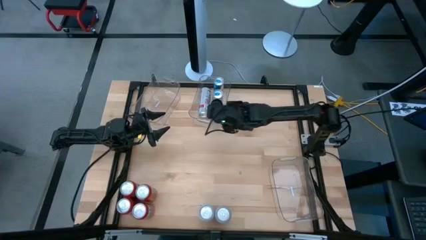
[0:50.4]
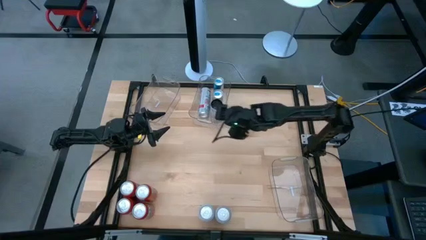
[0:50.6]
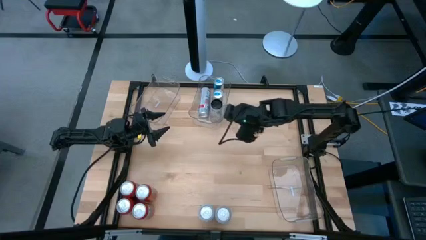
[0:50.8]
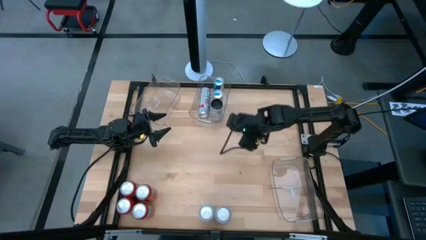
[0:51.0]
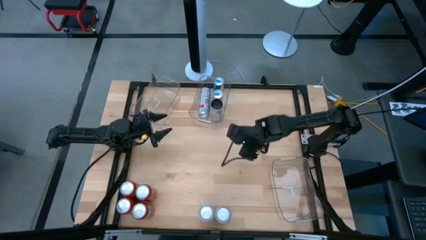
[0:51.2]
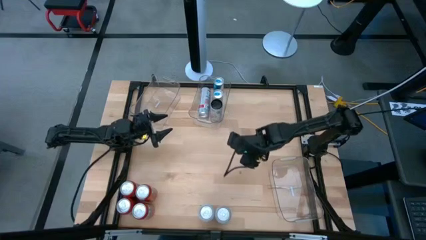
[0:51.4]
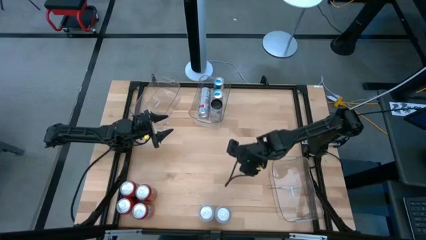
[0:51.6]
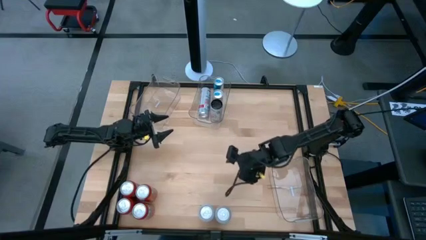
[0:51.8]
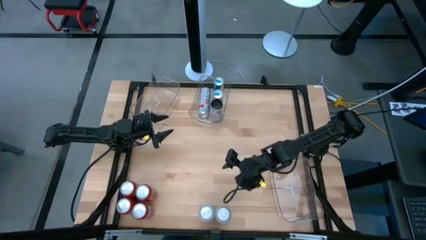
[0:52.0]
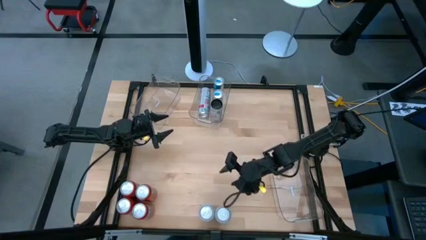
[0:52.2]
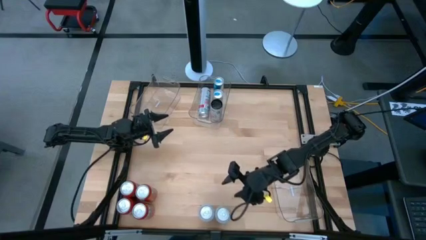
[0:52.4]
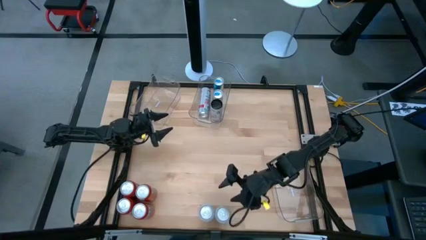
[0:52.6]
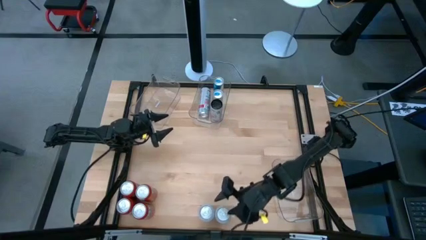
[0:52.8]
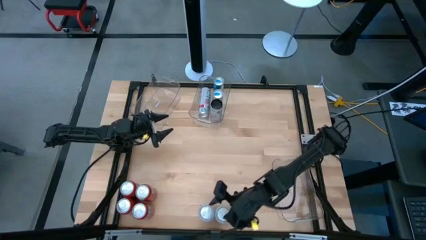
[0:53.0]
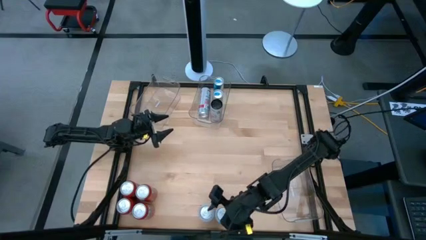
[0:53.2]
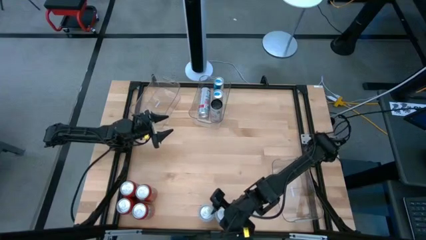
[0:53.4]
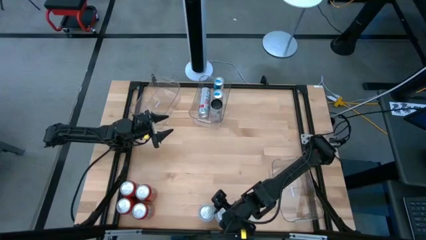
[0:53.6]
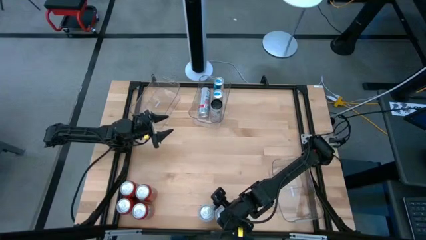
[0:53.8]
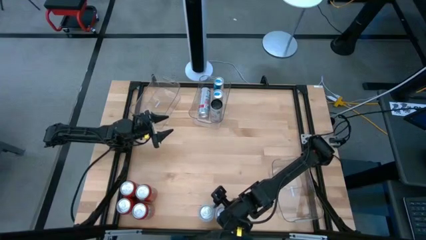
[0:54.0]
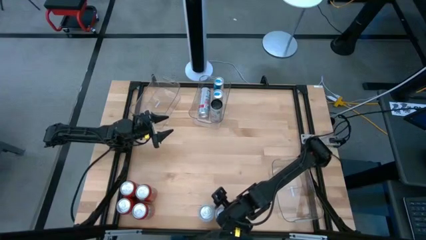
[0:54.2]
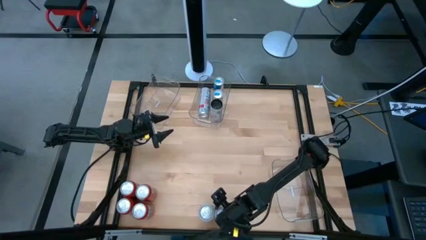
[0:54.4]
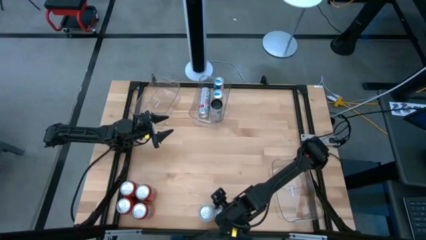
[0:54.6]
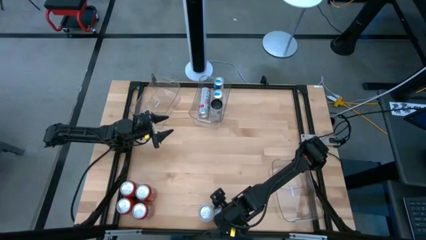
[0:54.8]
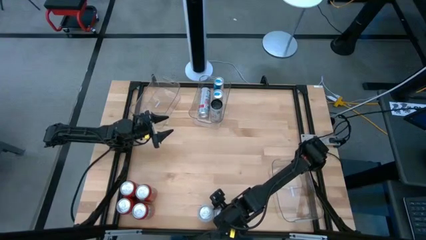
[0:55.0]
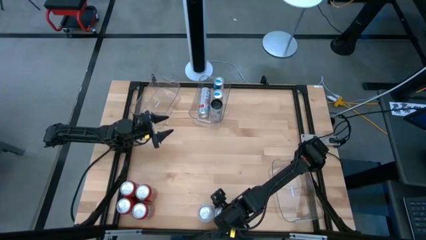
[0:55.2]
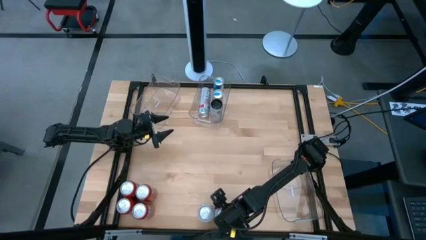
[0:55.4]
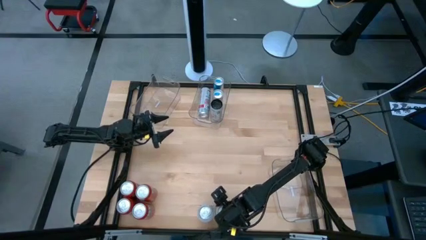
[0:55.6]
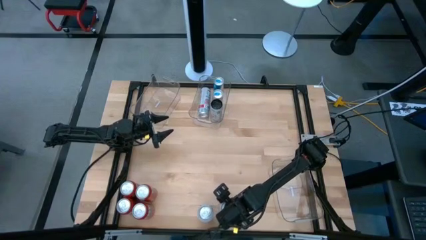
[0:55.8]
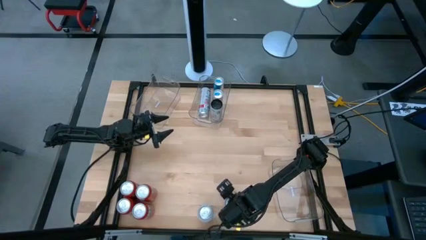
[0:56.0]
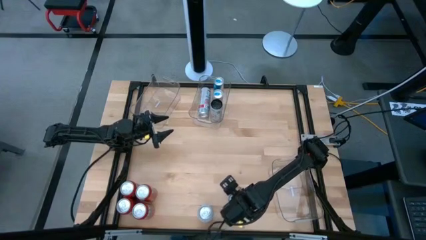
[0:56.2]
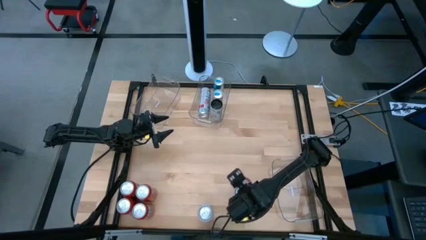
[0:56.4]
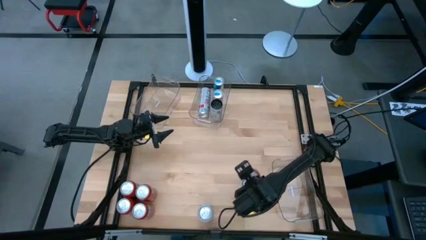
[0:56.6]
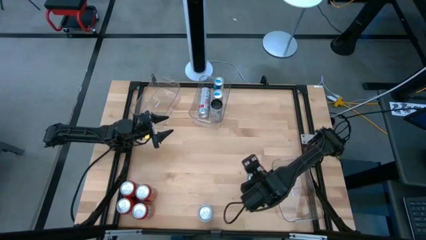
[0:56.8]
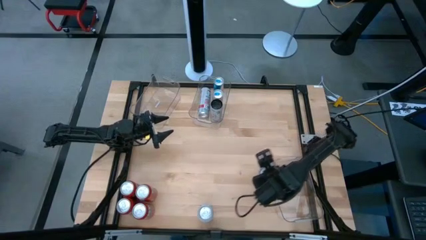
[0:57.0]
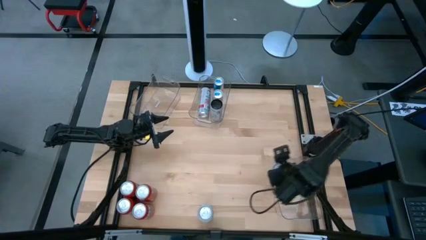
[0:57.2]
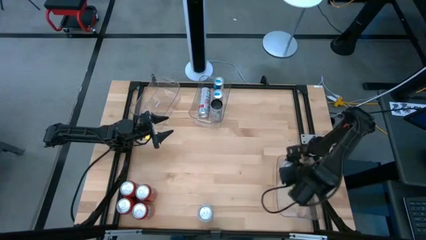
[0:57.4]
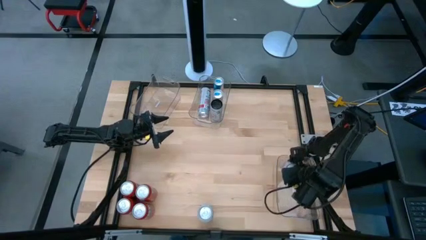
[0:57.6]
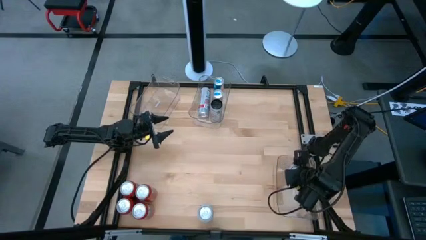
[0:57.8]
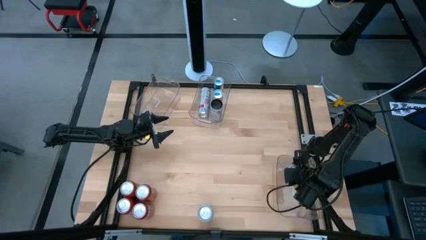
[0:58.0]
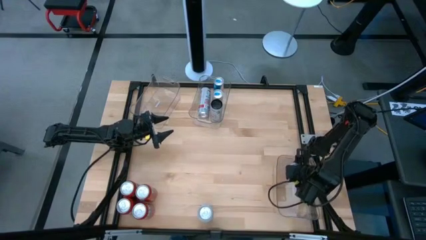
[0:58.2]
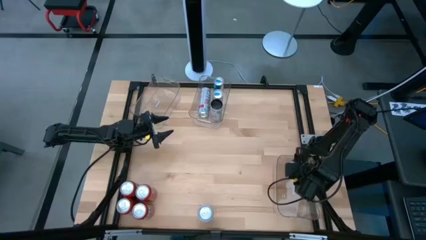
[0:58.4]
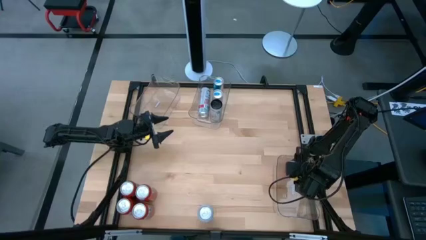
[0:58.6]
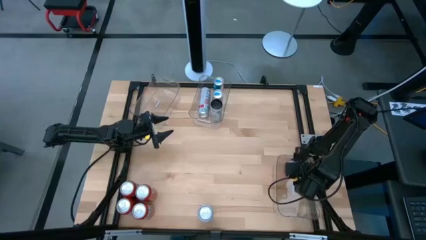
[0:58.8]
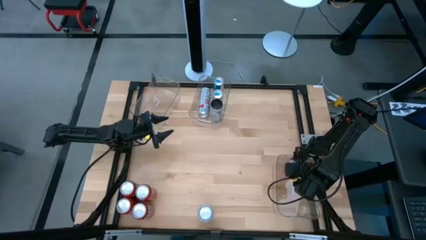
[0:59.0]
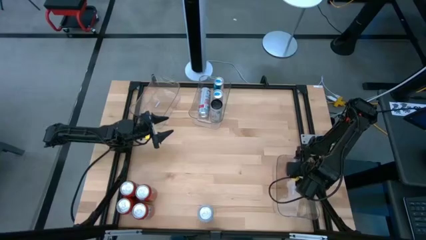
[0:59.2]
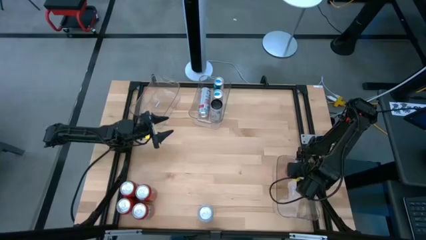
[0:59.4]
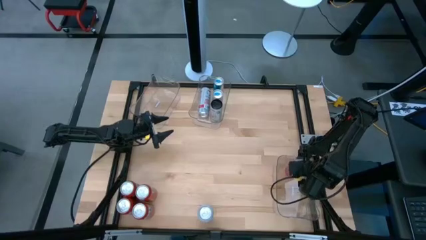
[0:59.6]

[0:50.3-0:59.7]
Task: Sort soda cans
Put the pink white soda can into the bottom right transparent bin

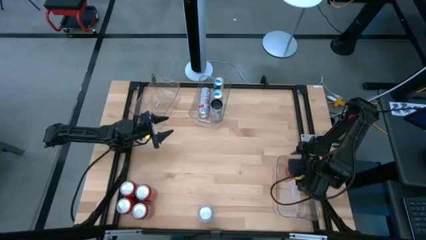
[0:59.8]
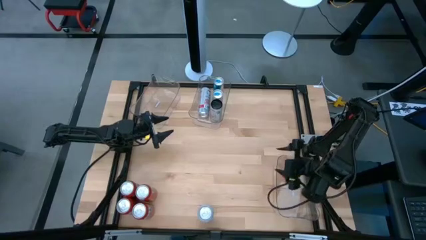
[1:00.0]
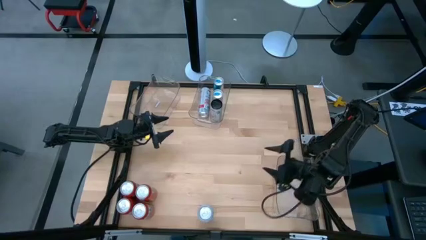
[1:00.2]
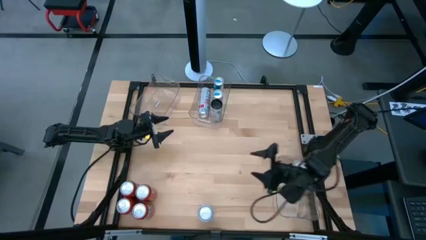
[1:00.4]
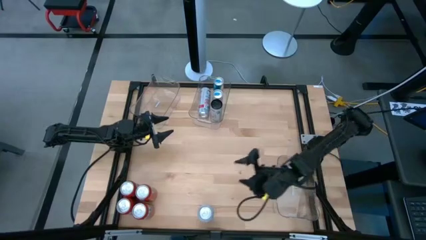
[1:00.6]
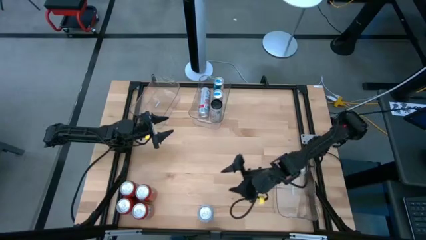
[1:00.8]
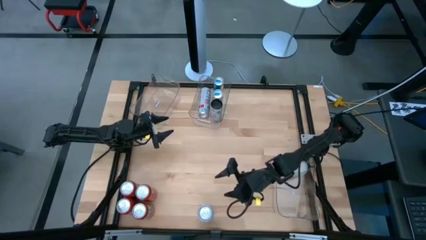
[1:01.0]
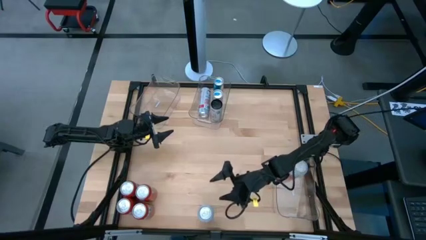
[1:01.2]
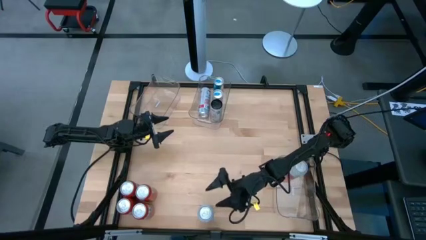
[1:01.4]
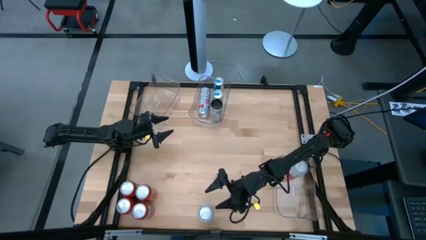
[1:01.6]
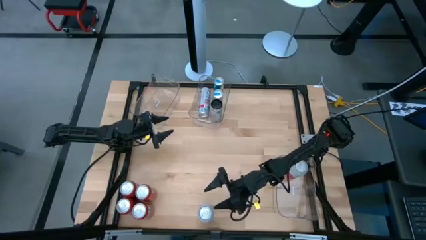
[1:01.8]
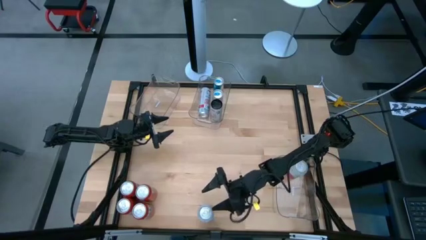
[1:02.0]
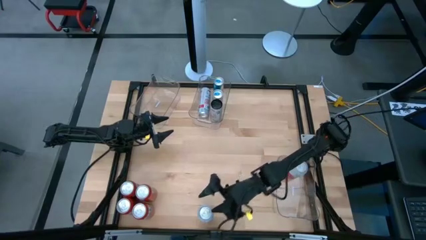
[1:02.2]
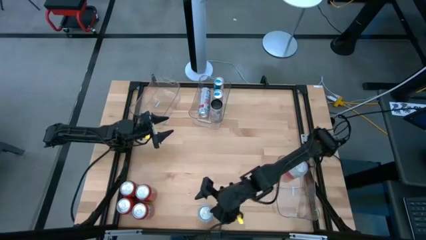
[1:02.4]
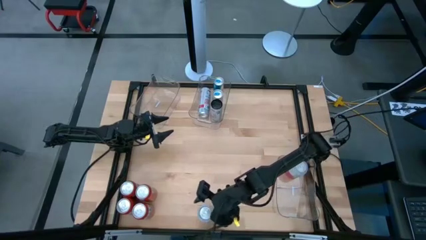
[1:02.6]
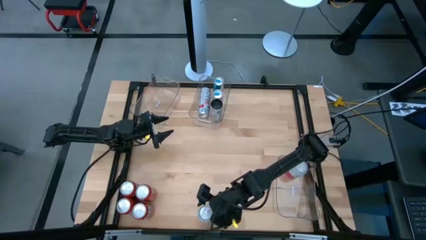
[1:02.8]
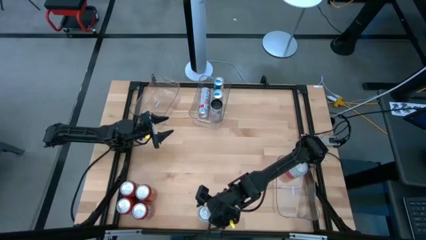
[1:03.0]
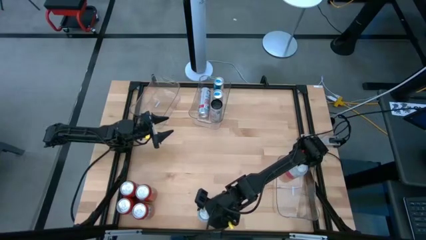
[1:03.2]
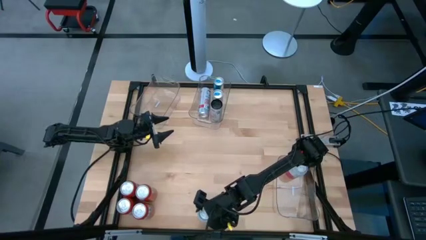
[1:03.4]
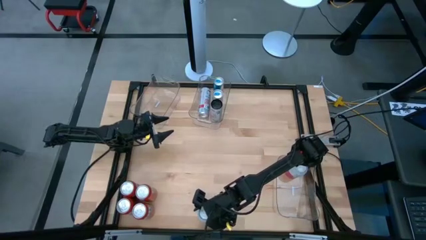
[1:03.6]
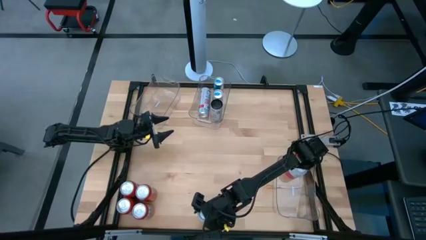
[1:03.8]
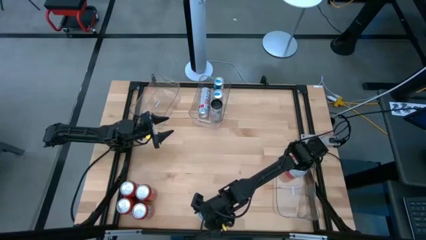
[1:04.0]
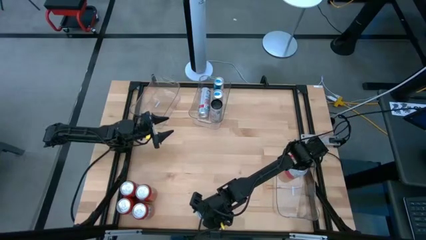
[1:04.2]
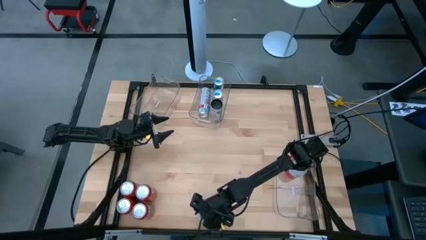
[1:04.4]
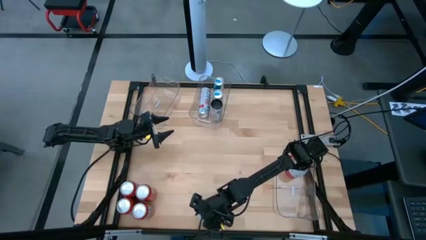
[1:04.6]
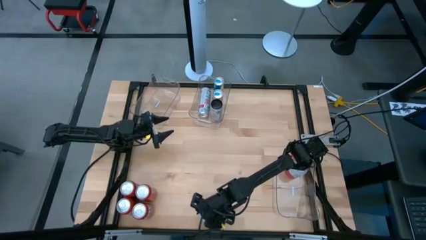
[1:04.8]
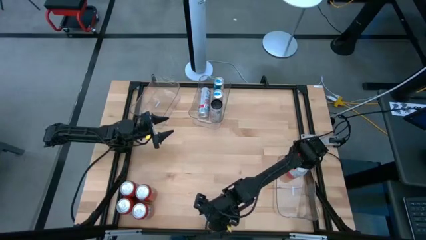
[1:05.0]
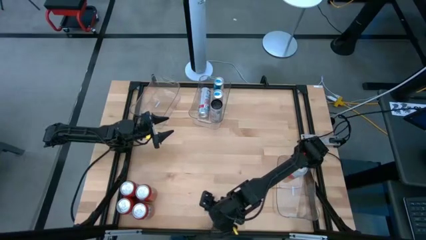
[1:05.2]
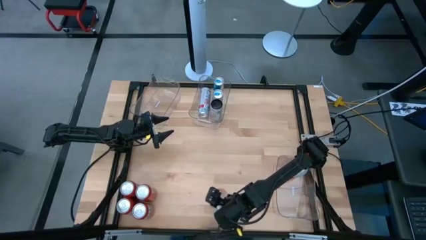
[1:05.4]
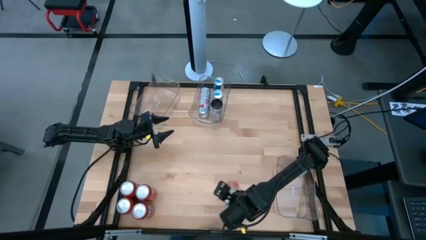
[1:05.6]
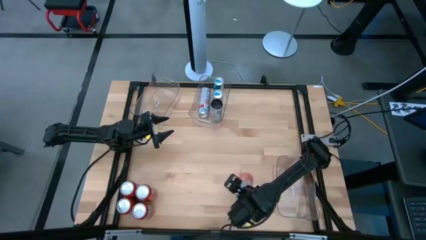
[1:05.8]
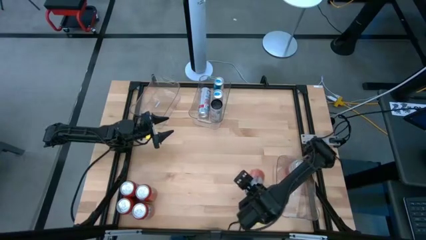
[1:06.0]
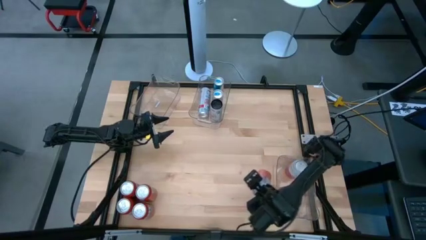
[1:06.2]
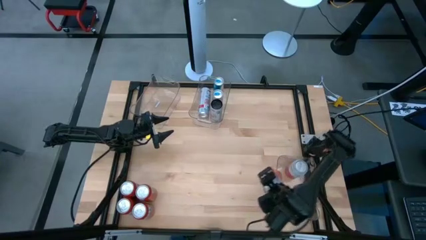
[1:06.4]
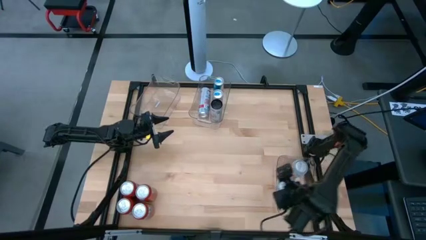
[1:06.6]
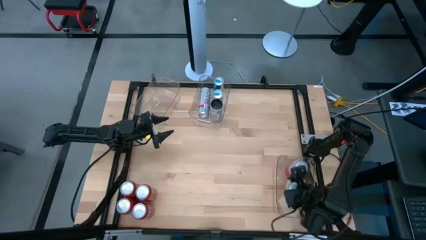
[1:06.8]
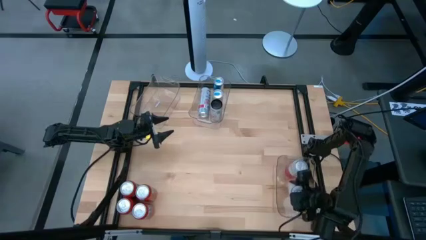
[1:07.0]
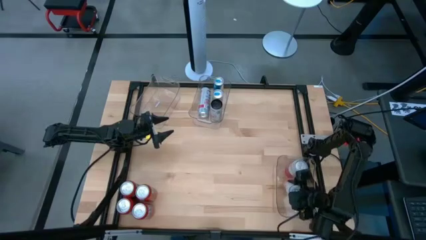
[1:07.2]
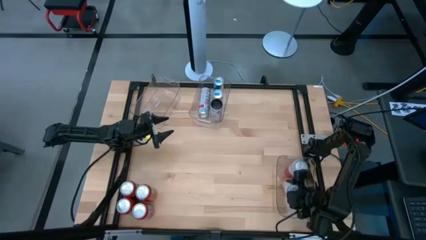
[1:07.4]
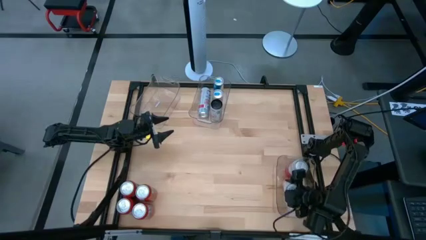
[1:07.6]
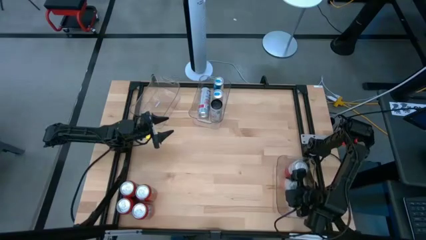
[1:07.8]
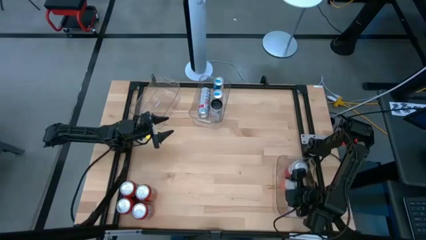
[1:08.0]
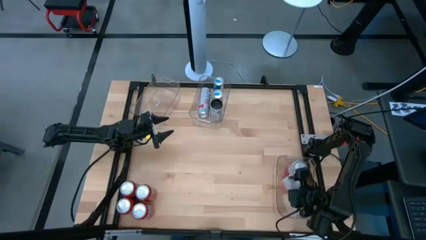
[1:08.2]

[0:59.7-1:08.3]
Put the orange white soda can into the bottom right transparent bin
